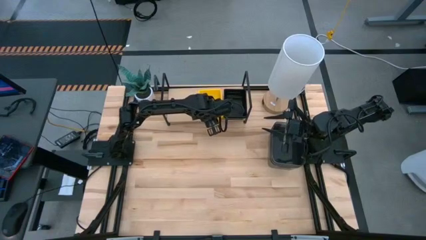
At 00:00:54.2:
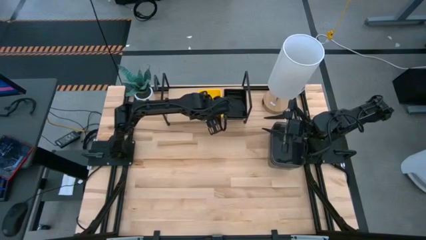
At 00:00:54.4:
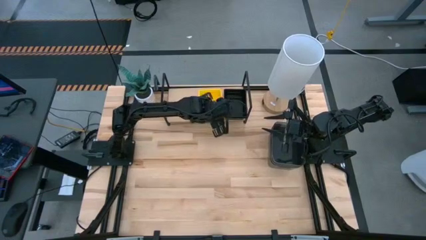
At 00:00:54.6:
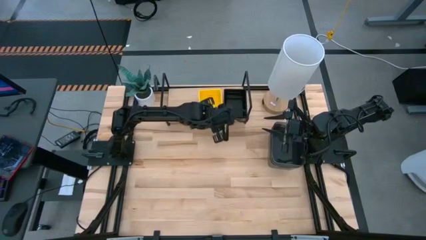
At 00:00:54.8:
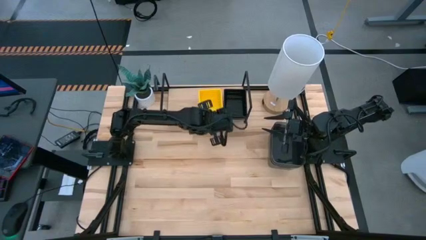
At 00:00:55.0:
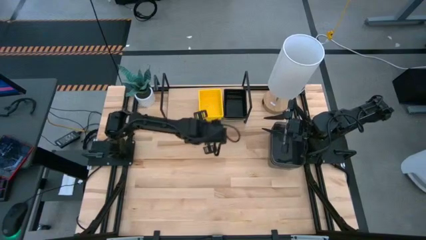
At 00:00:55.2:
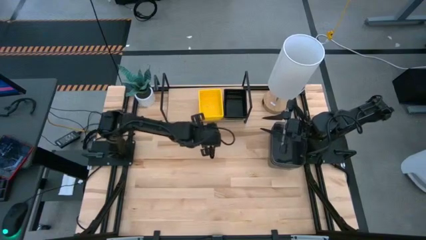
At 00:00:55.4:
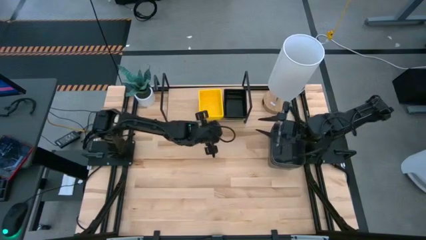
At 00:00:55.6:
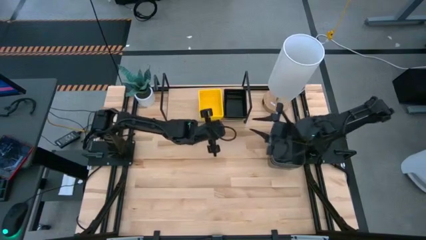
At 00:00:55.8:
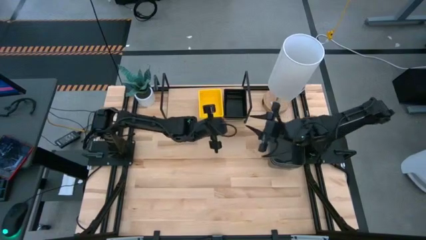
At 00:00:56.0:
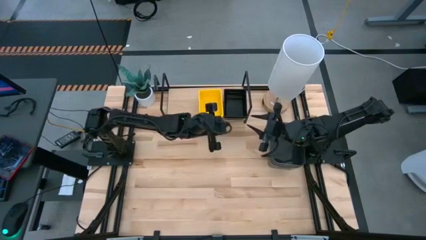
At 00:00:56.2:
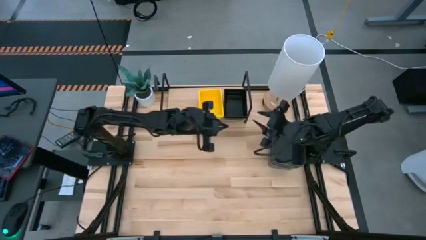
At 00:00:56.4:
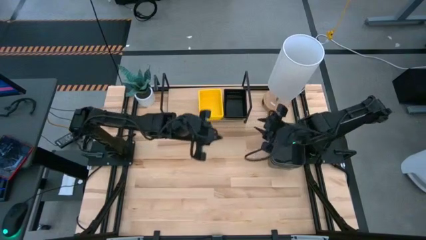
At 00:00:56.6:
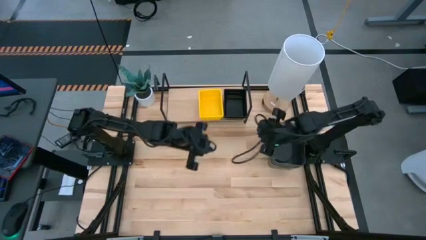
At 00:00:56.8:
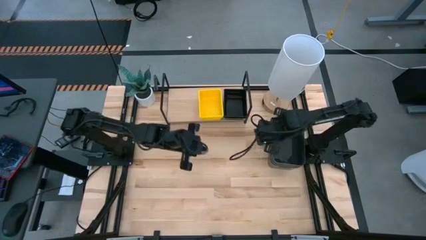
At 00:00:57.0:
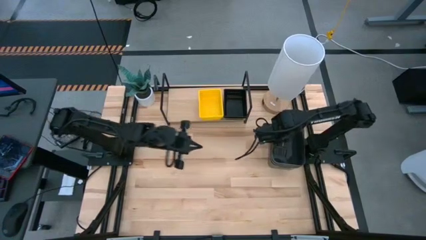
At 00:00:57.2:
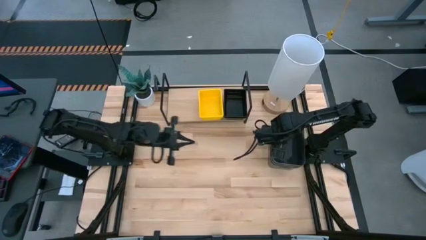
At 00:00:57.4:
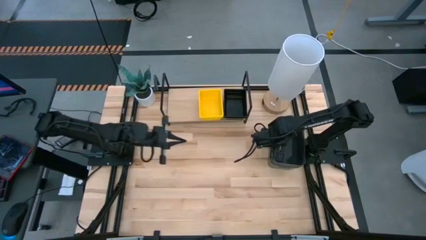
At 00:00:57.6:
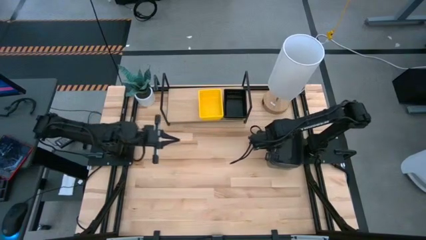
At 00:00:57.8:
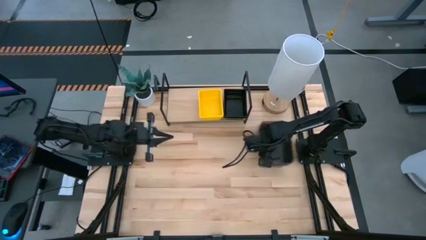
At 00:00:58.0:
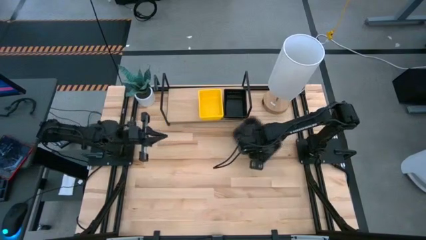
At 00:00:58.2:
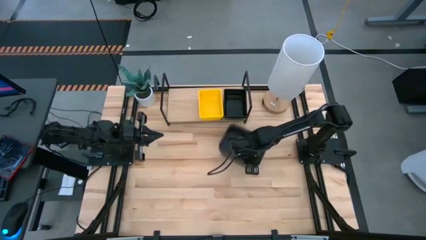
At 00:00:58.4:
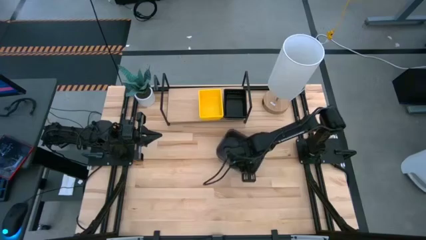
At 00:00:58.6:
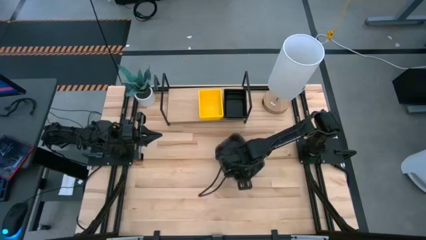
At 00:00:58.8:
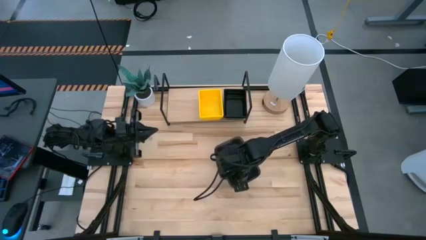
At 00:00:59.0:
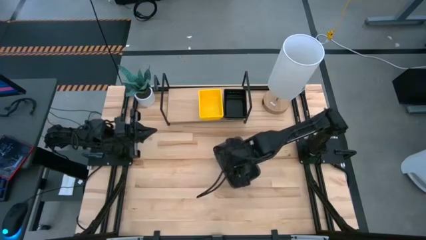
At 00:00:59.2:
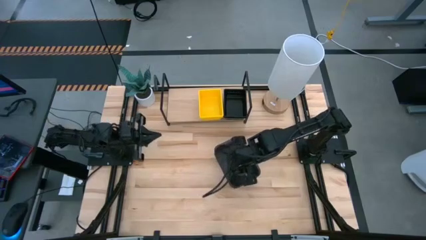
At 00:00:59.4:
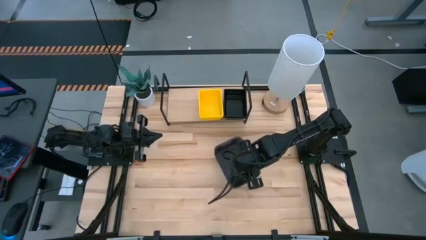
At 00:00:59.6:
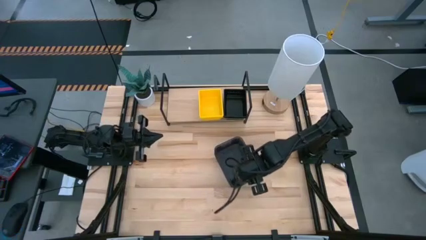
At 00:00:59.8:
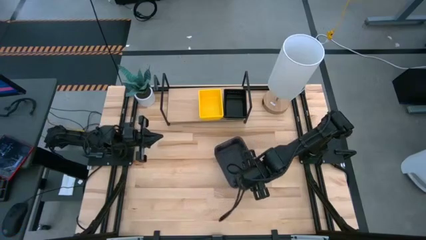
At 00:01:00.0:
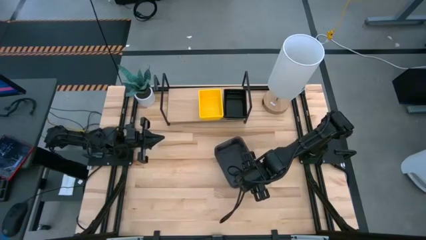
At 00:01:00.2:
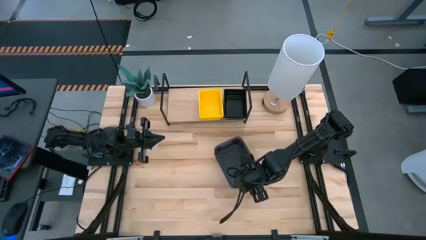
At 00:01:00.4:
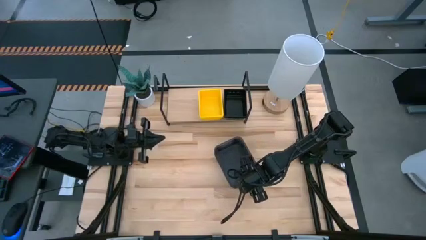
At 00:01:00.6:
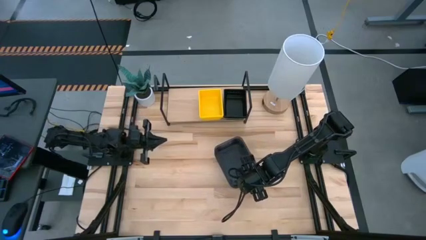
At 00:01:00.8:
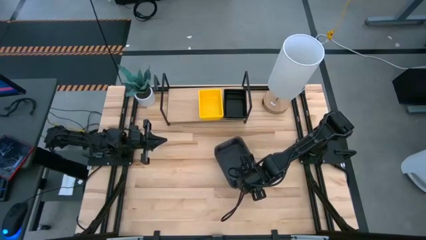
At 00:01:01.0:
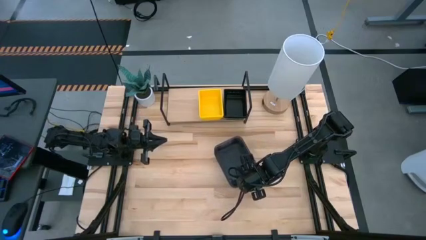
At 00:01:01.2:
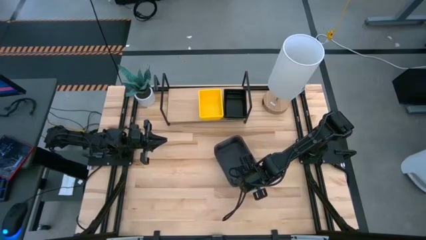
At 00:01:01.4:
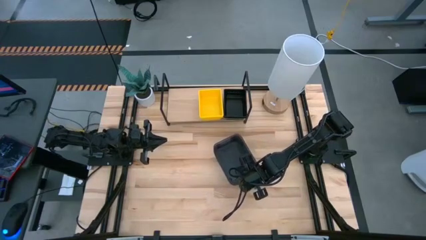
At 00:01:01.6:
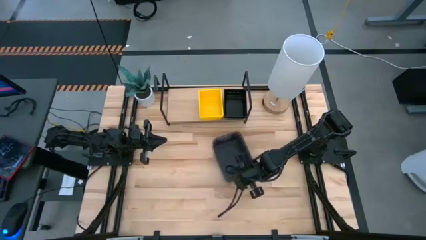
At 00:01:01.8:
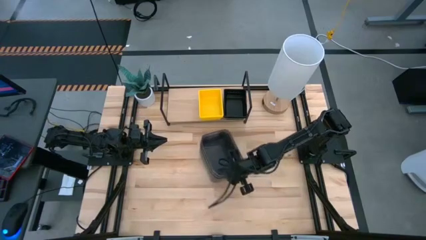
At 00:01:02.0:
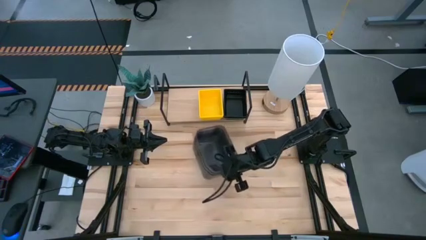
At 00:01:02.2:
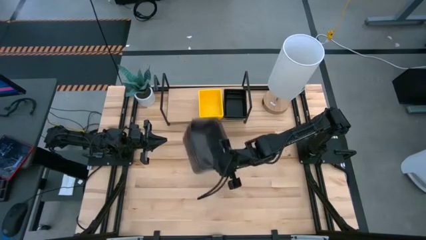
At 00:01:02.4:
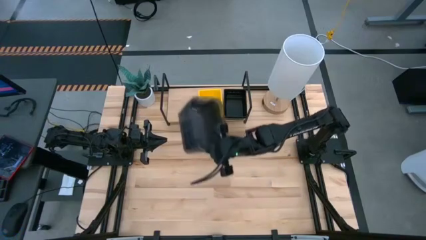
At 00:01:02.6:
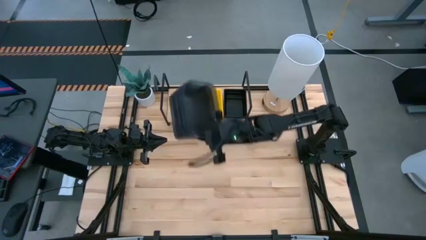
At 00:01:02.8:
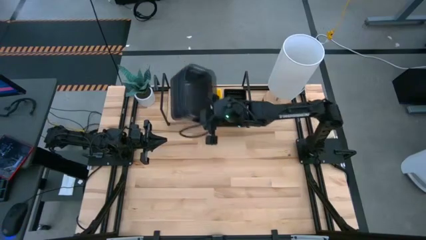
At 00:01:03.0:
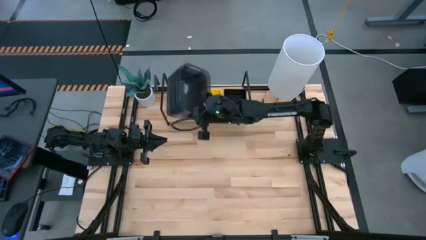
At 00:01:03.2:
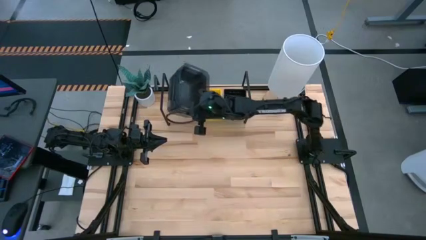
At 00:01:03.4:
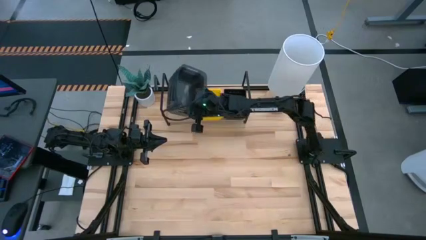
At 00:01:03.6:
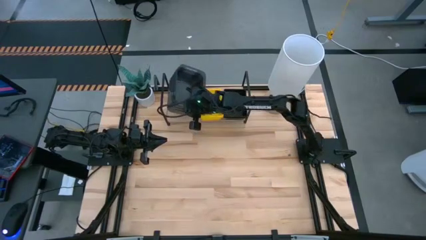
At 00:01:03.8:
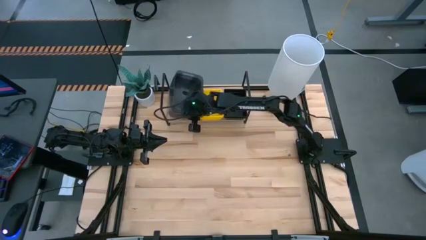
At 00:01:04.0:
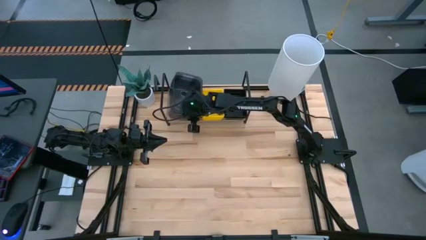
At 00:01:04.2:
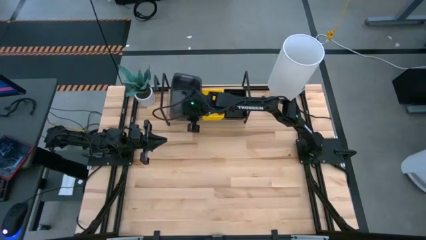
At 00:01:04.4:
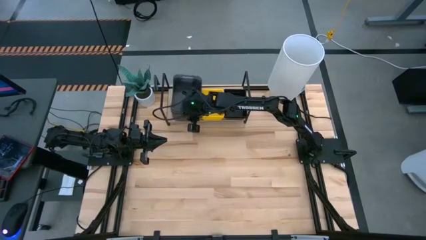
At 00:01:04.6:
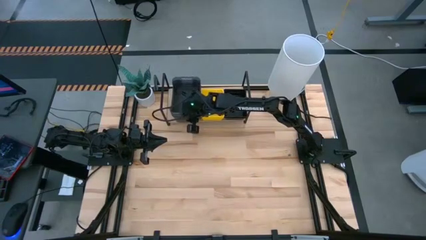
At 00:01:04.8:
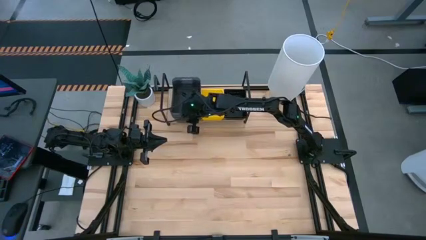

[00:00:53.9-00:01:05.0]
Task: Stack baskets on shelf by color
Put the stacked gray bins on the shelf

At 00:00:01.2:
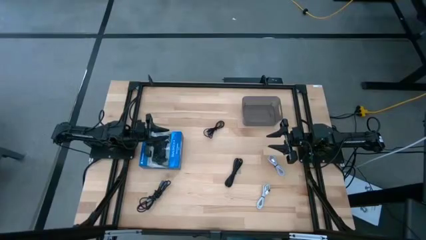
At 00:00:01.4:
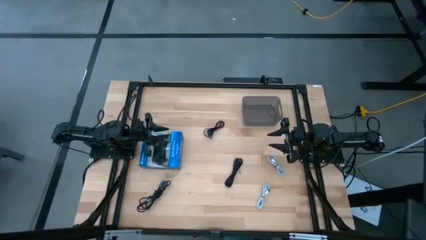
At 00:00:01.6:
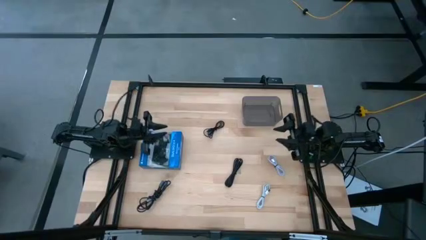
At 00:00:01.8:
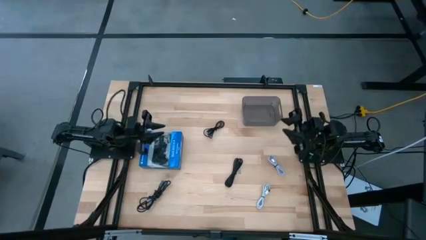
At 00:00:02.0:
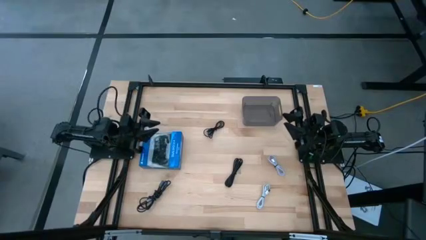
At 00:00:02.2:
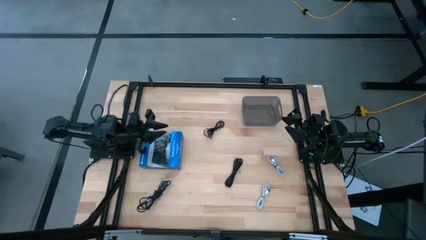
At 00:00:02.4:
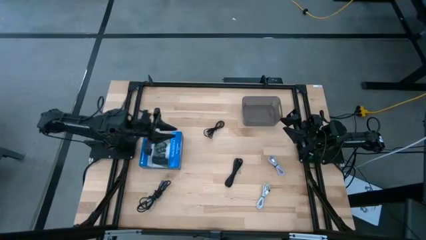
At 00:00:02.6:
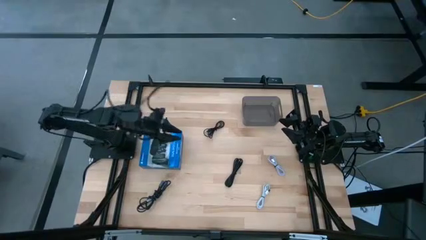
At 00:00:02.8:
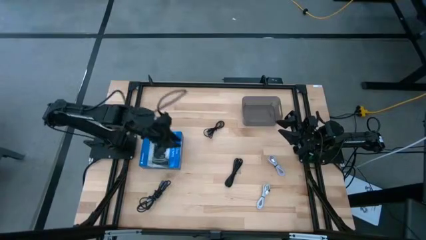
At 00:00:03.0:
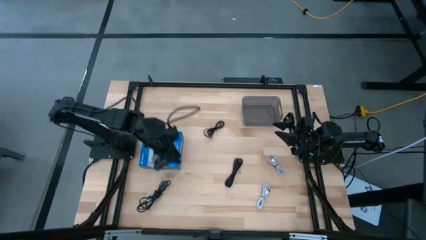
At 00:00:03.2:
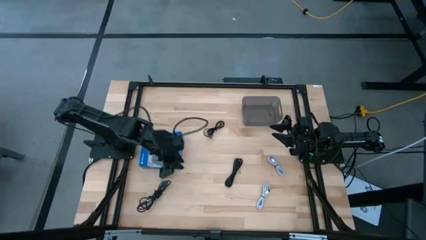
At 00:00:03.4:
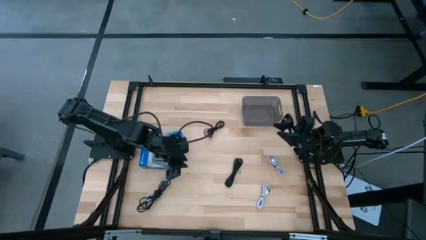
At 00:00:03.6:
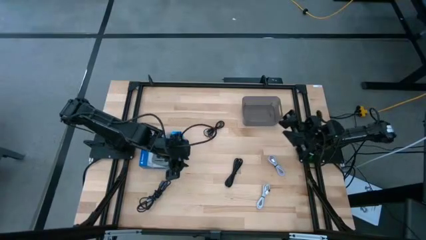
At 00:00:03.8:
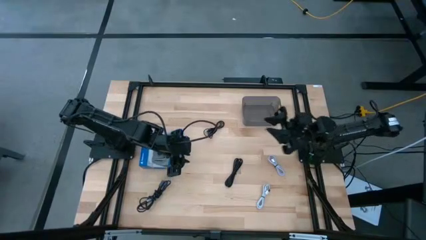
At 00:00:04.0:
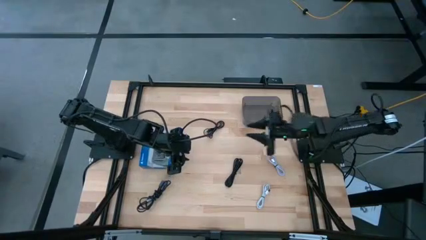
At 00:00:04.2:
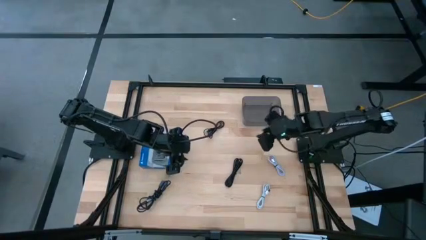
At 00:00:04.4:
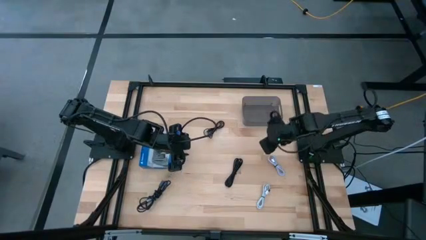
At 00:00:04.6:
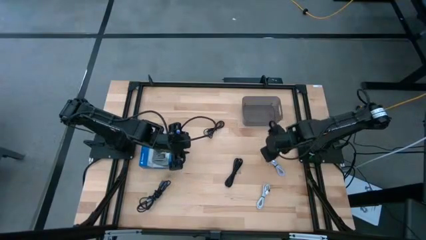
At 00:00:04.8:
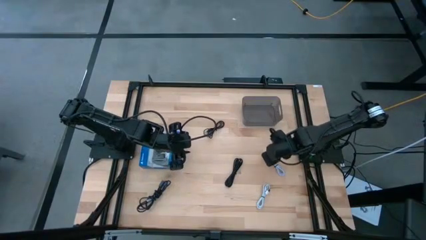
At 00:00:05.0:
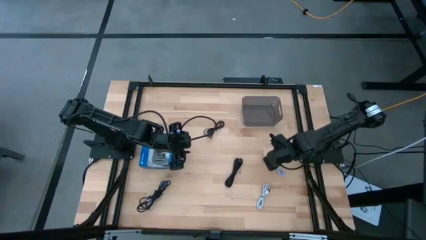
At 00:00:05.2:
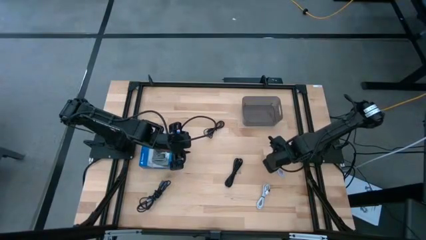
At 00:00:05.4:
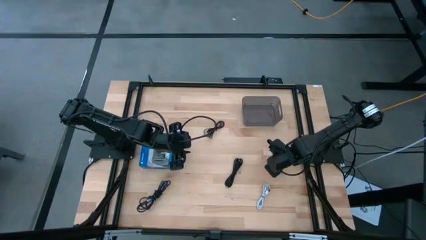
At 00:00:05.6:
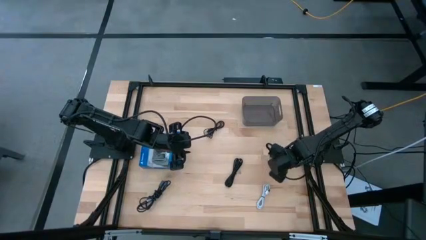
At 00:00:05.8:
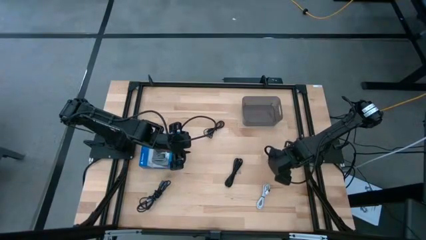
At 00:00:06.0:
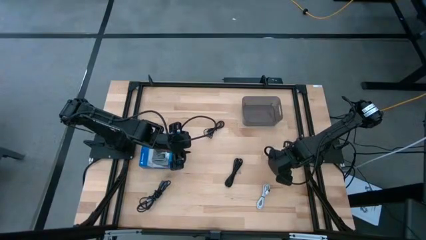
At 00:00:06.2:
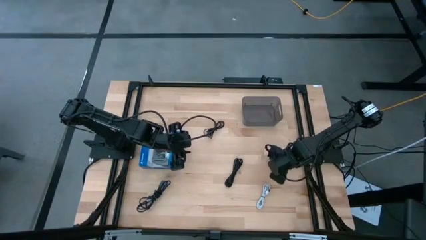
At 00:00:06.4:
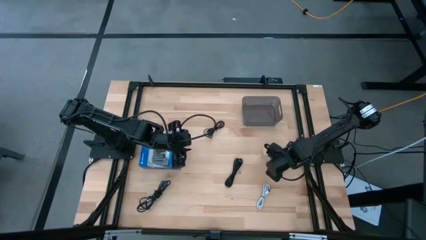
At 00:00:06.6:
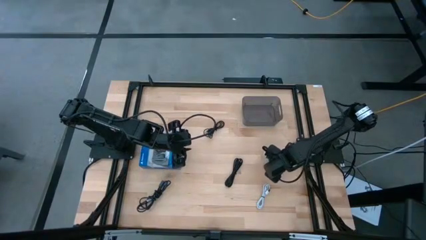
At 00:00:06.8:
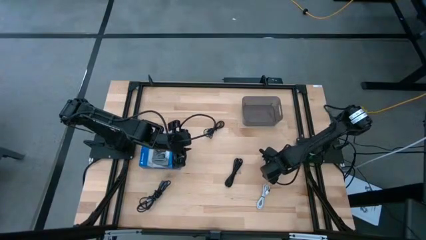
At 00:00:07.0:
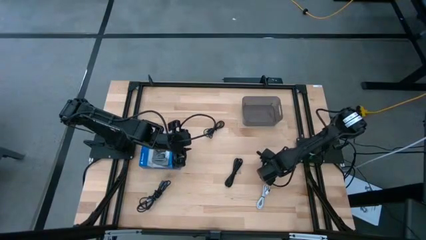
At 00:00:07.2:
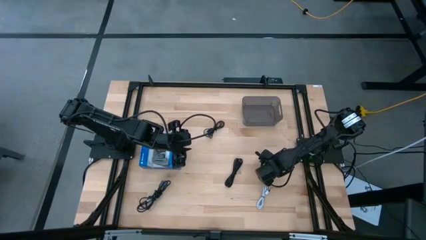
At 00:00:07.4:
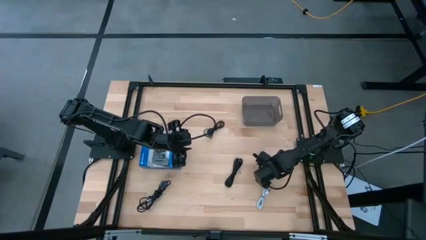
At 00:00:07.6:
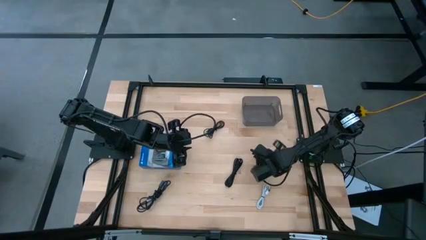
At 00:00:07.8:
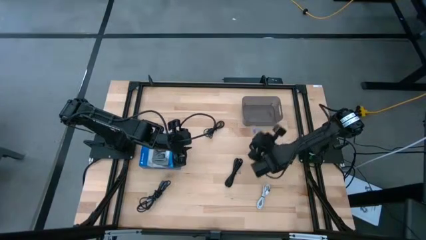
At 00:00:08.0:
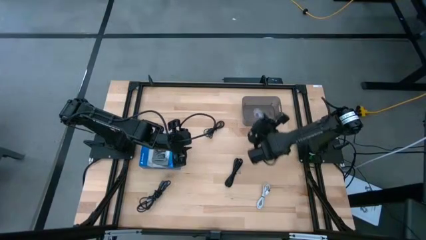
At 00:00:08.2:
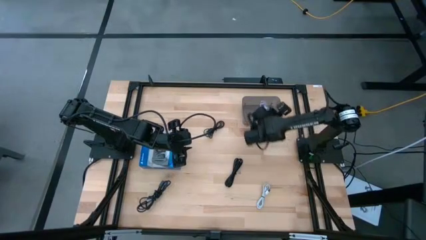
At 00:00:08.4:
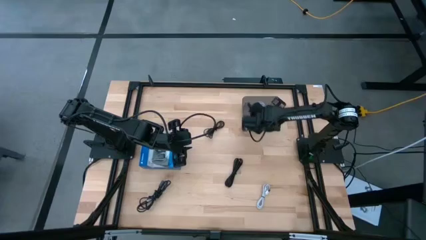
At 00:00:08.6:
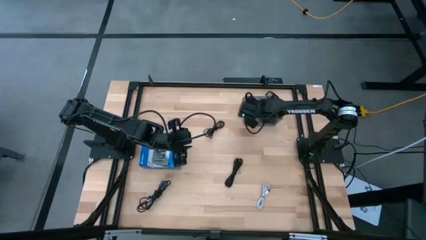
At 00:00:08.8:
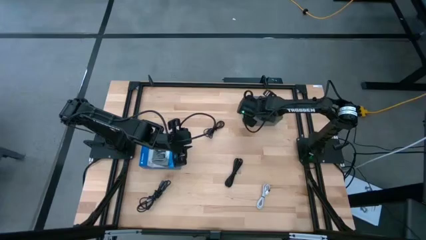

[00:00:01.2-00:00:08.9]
Task: Pick and place USB-C Cables
Put the purple charger cable into the black bin
